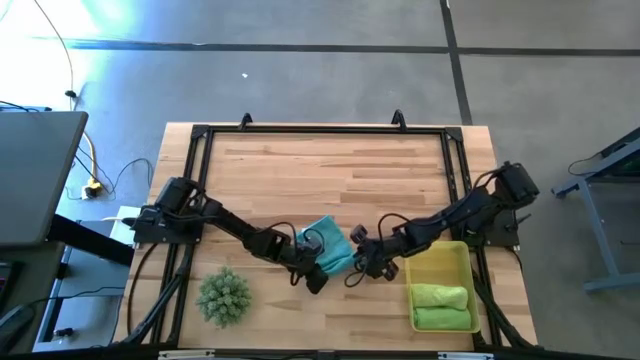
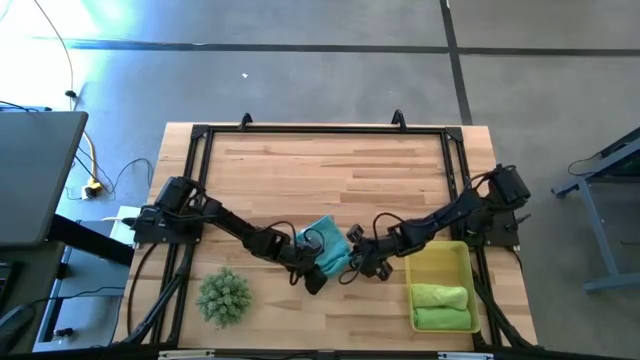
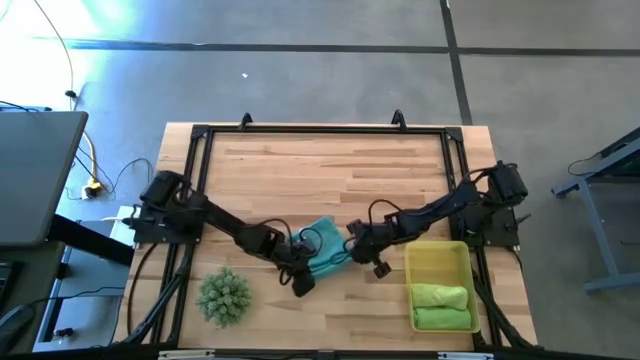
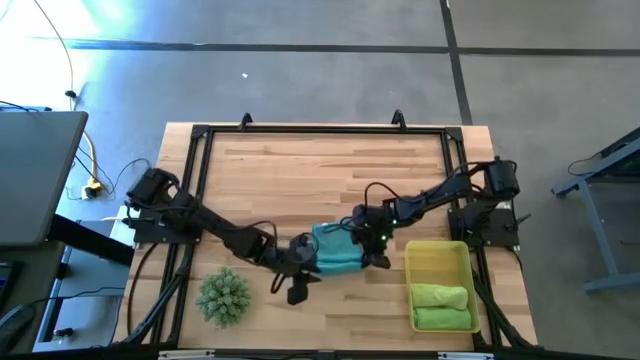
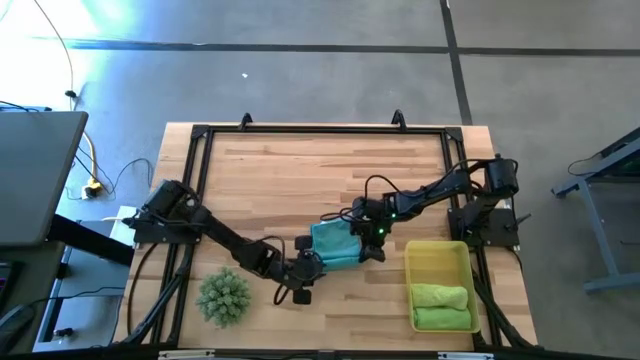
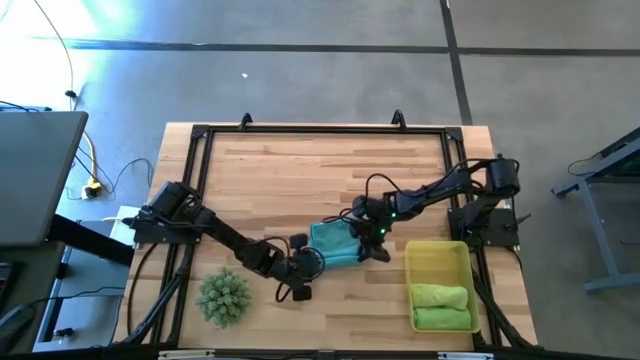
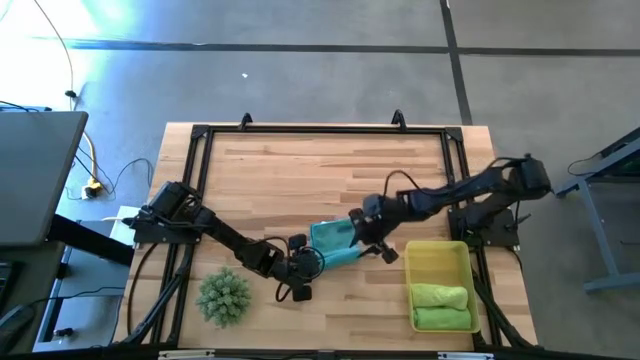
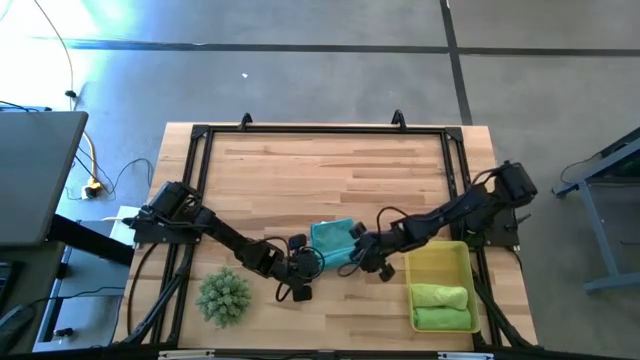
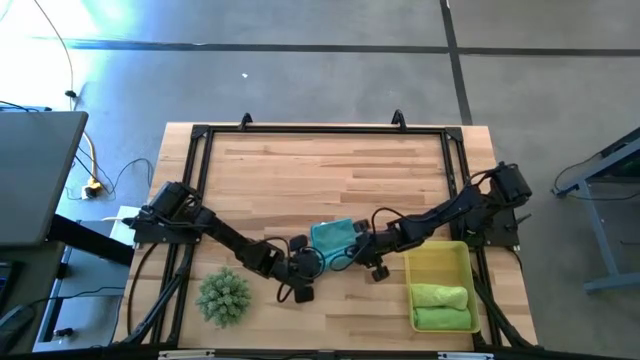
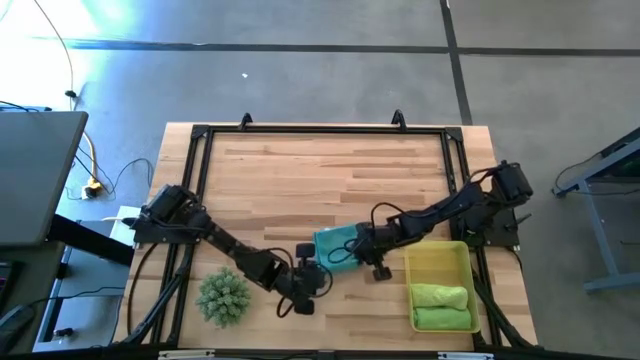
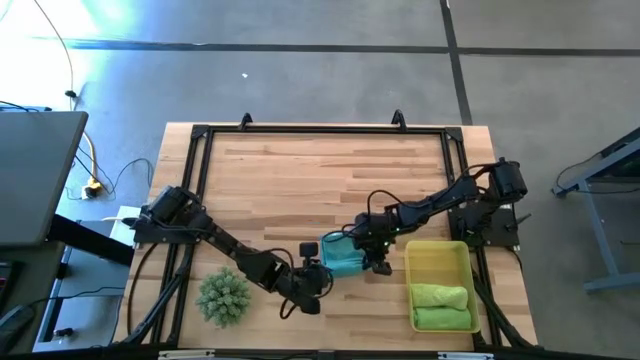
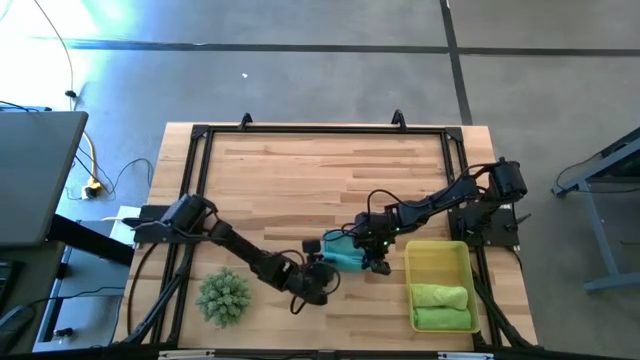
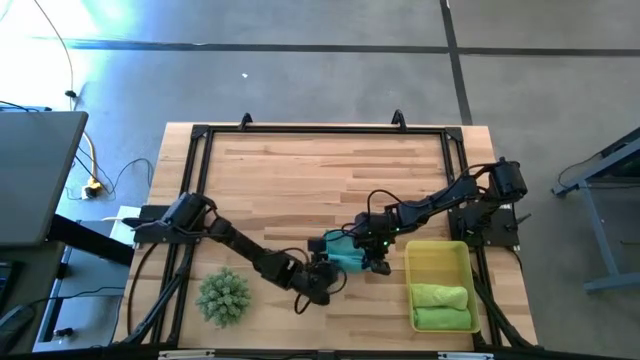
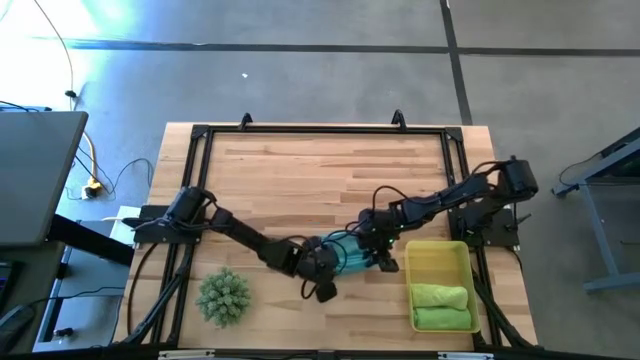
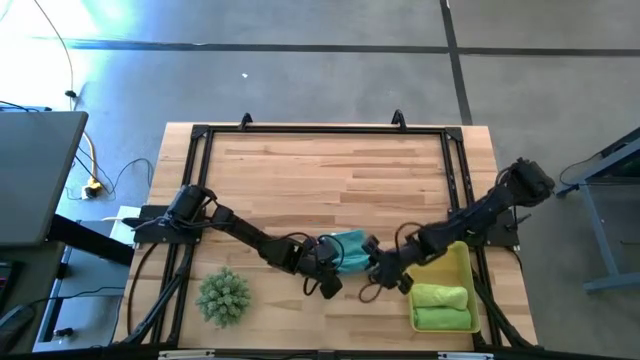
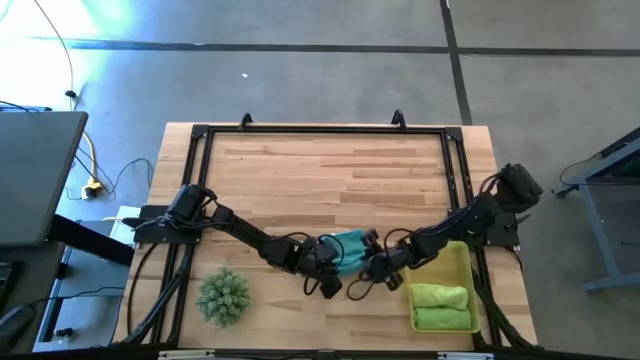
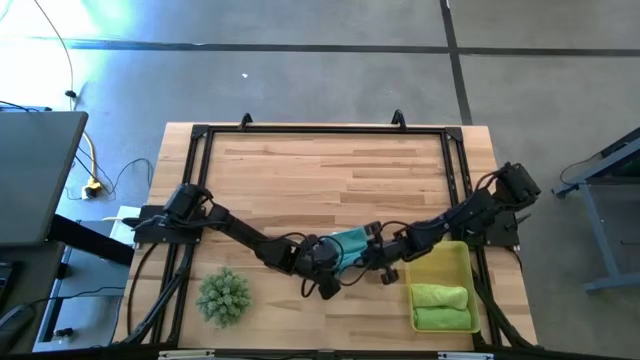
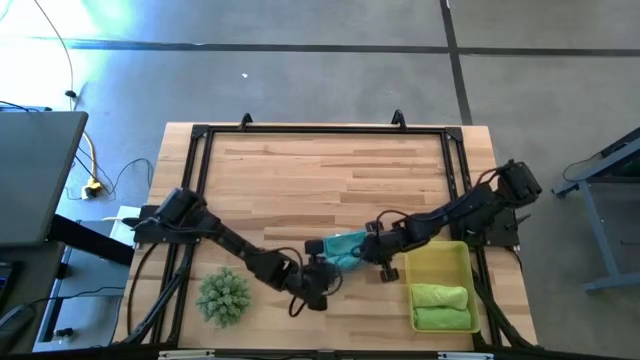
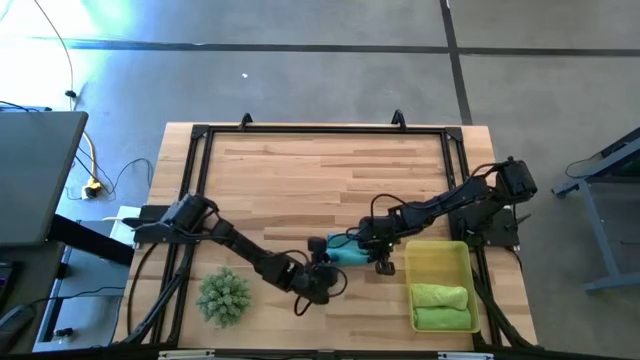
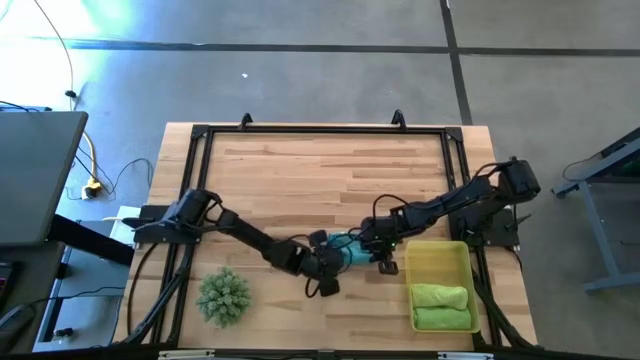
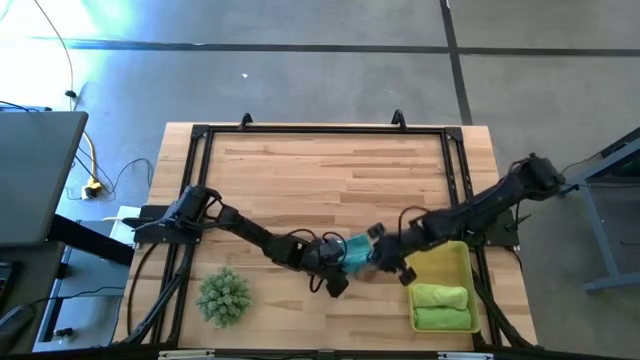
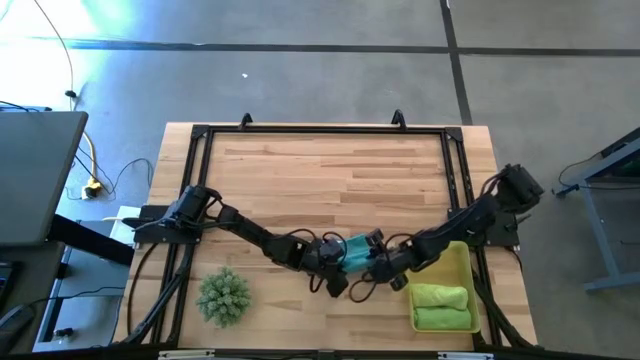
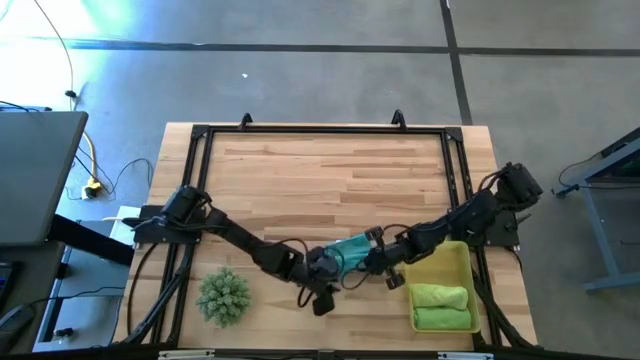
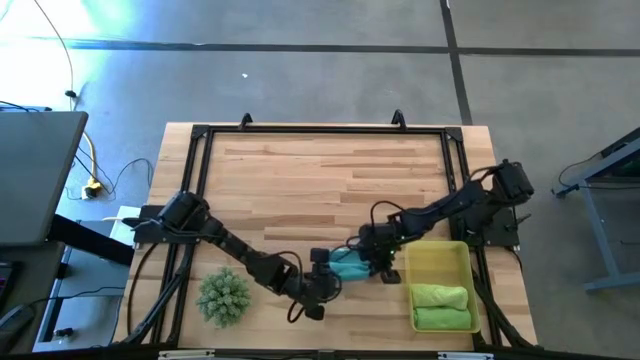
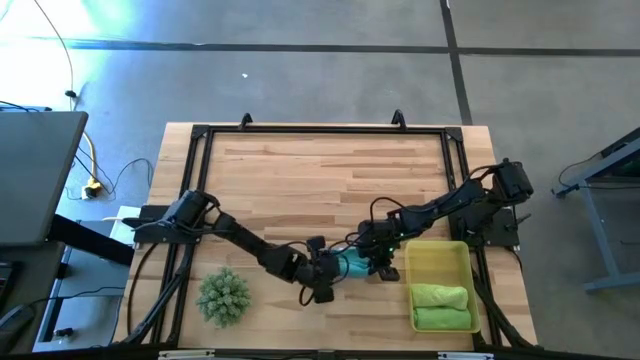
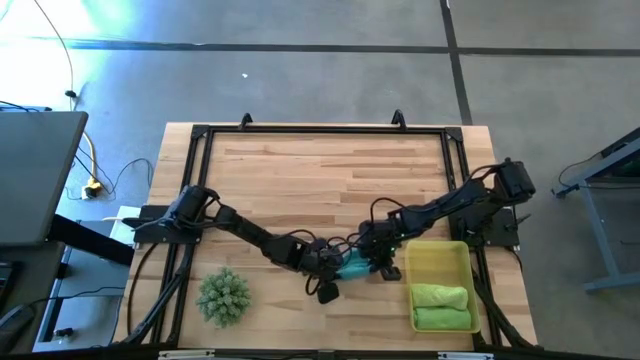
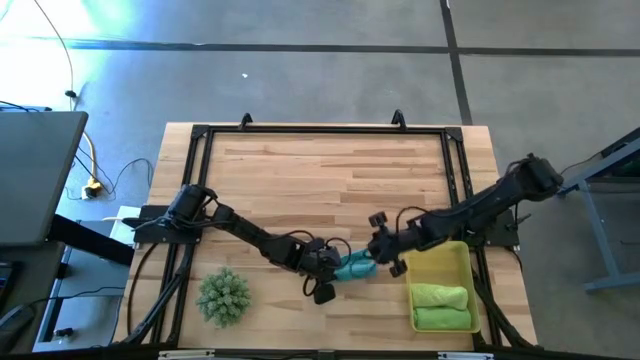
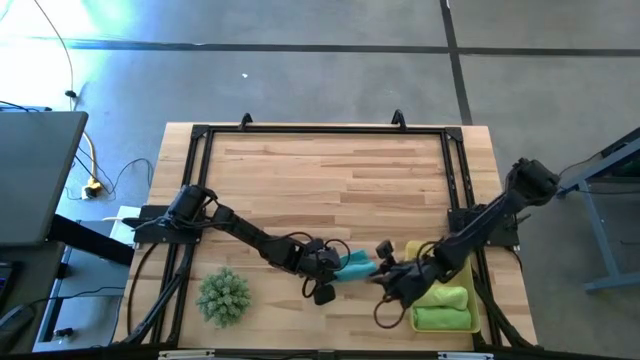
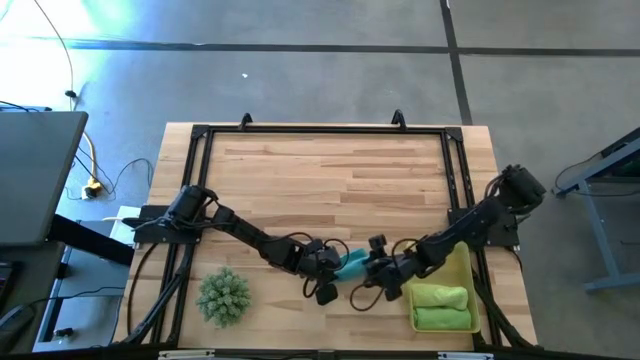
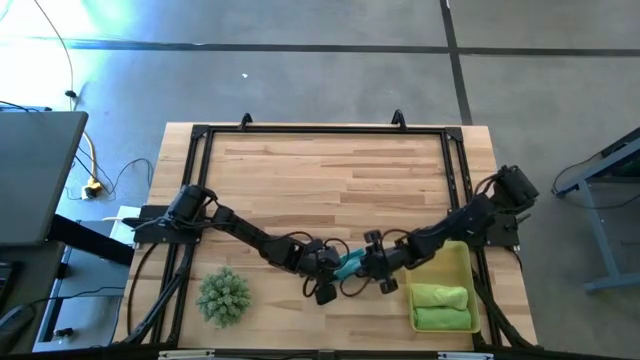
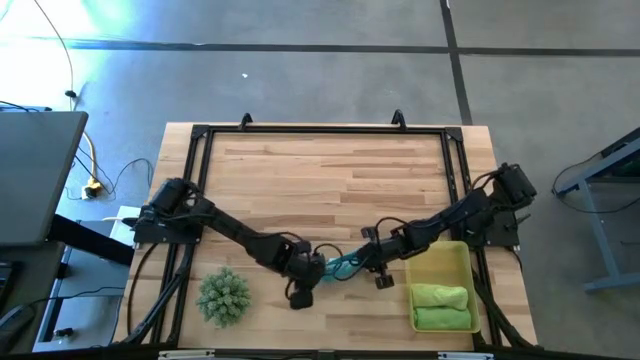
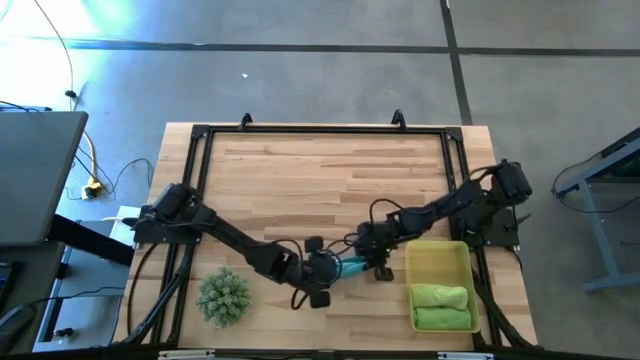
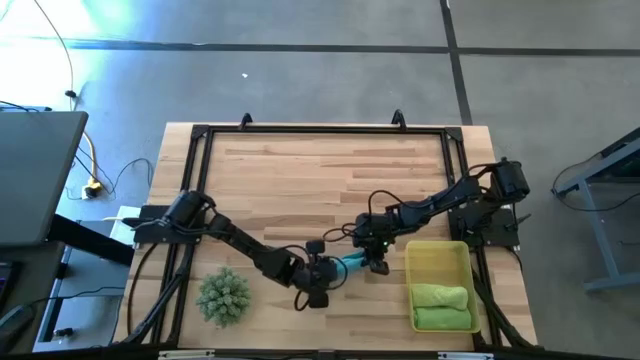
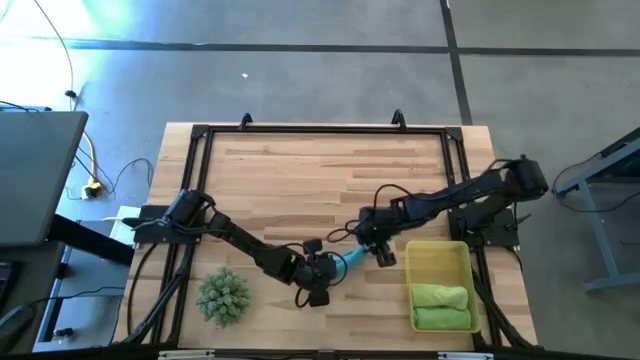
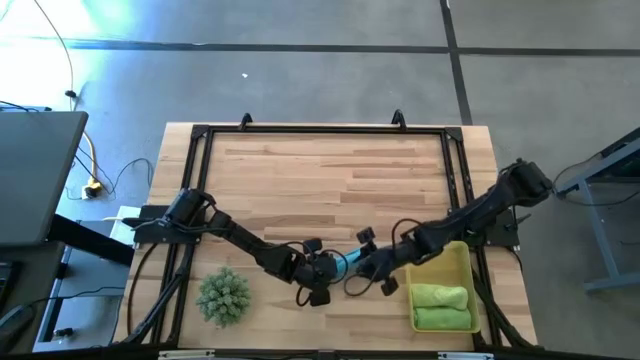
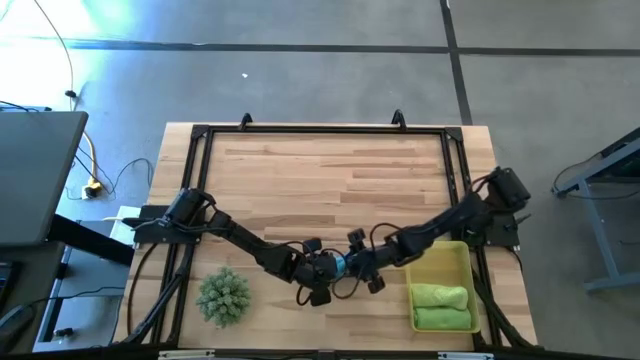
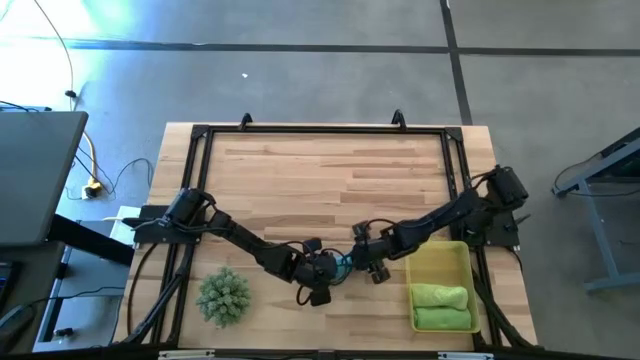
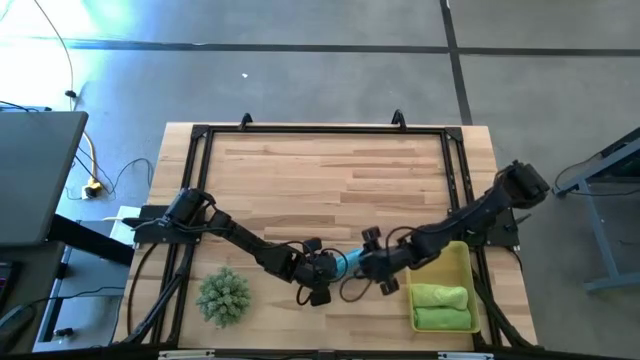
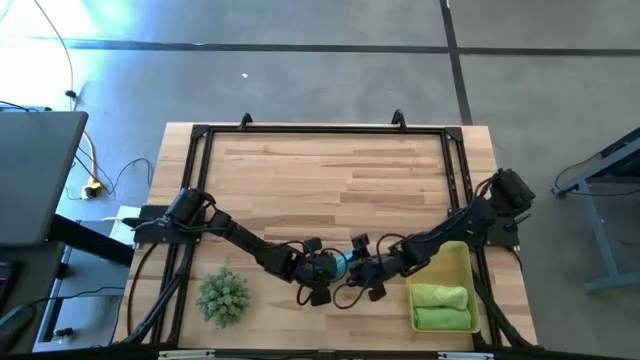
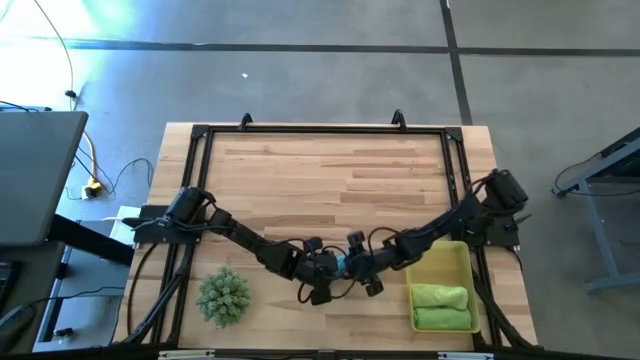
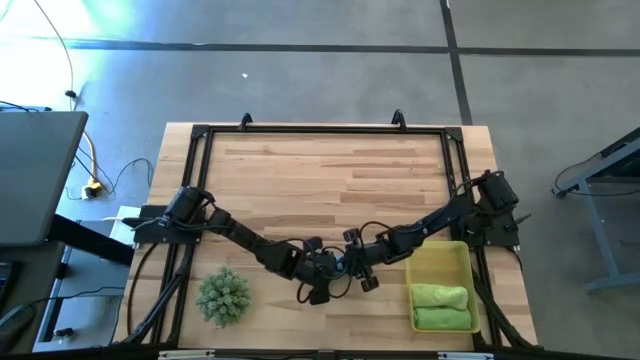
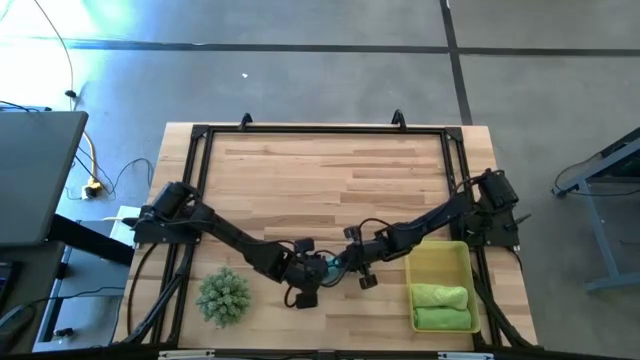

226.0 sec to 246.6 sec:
Task: Roll microfiber towels into tight, uniform cylinder then place into a basket
Roll the blue microfiber cloth

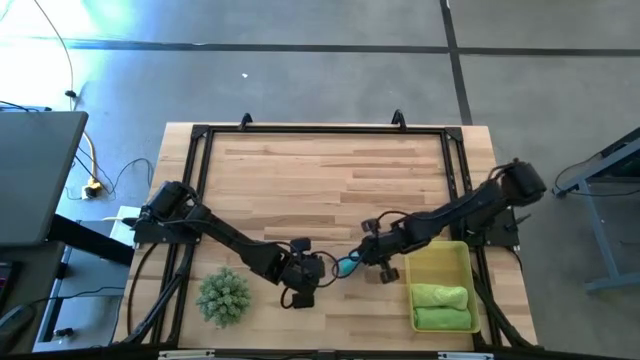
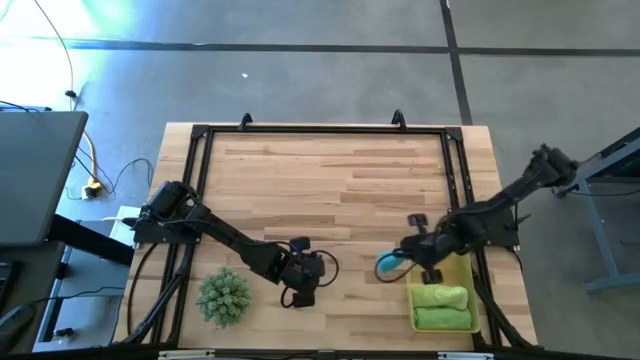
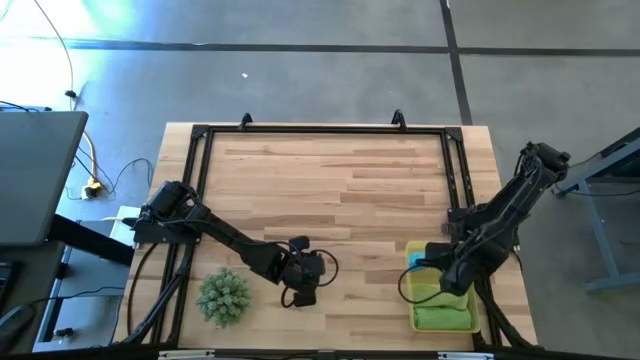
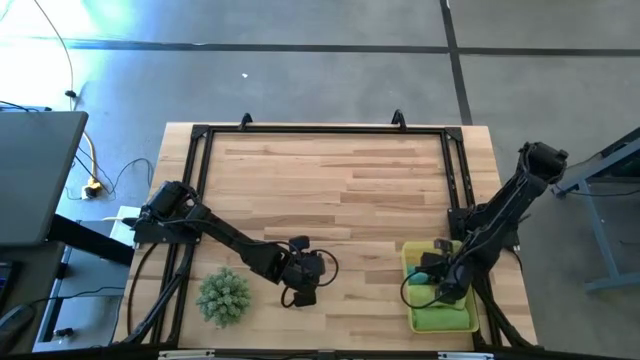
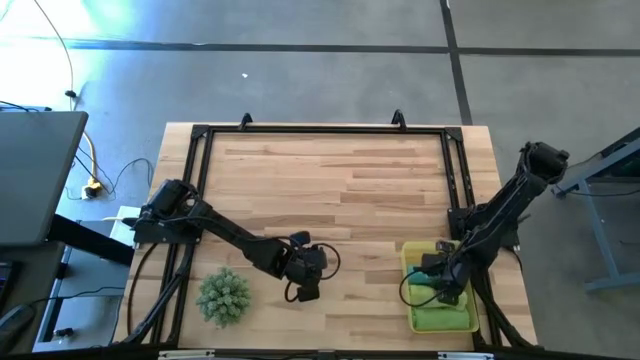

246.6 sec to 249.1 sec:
Put the blue microfiber cloth into the yellow bin
